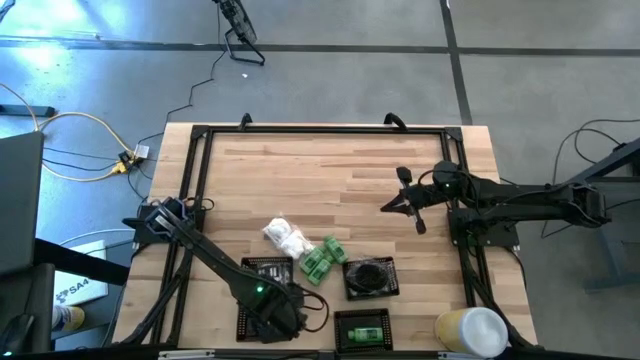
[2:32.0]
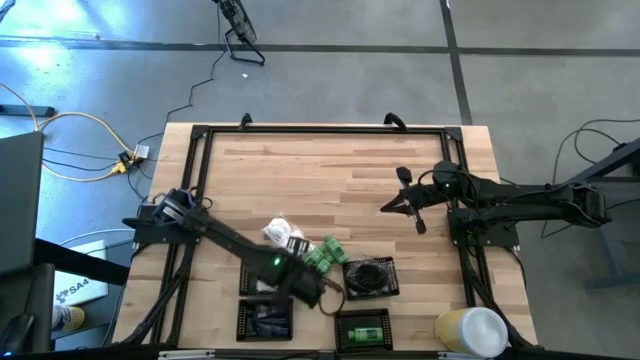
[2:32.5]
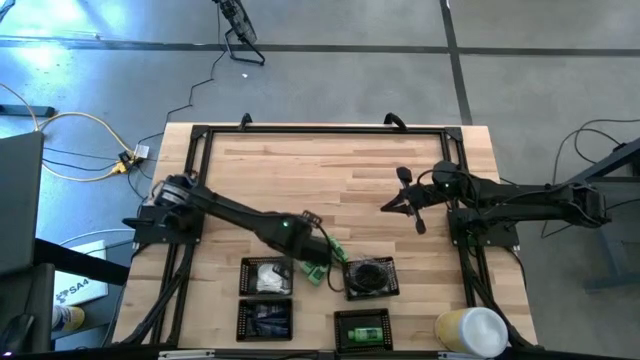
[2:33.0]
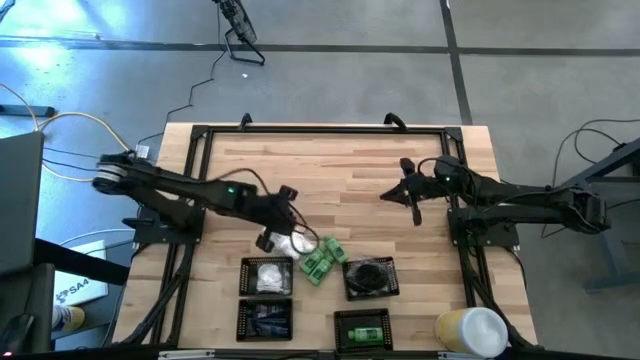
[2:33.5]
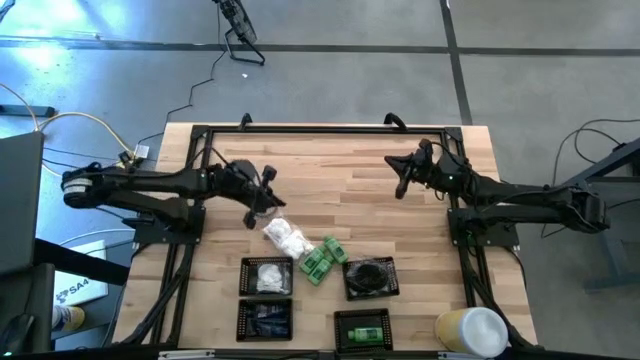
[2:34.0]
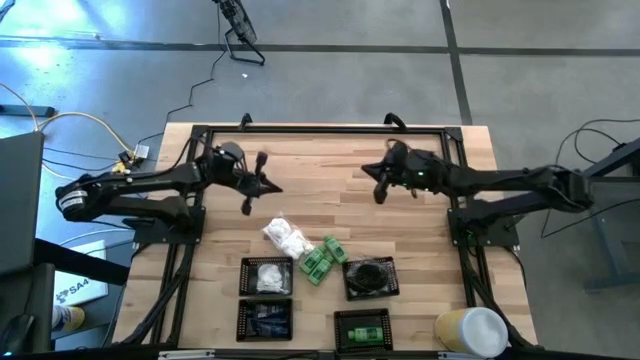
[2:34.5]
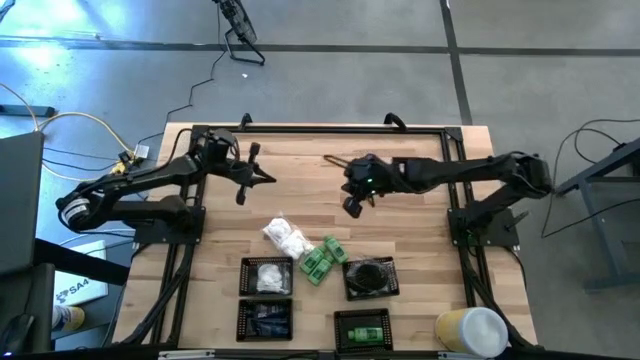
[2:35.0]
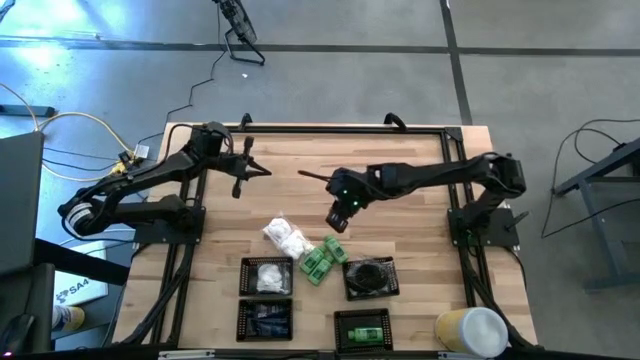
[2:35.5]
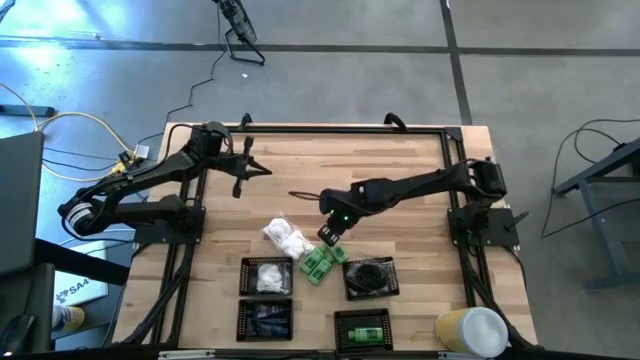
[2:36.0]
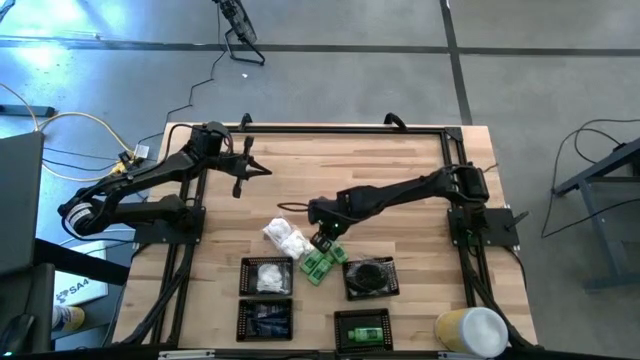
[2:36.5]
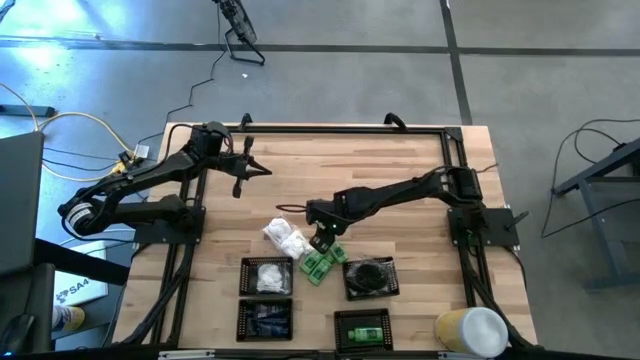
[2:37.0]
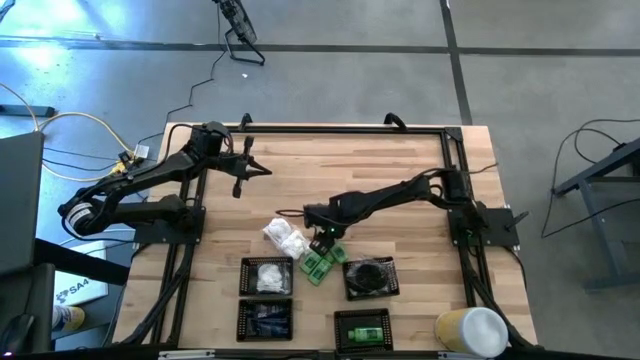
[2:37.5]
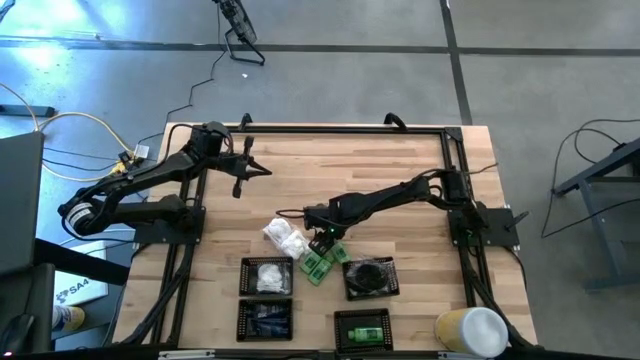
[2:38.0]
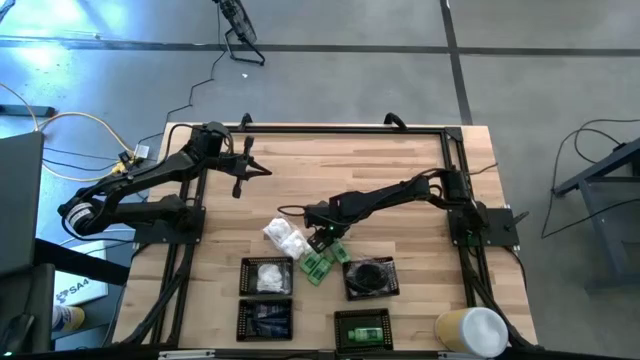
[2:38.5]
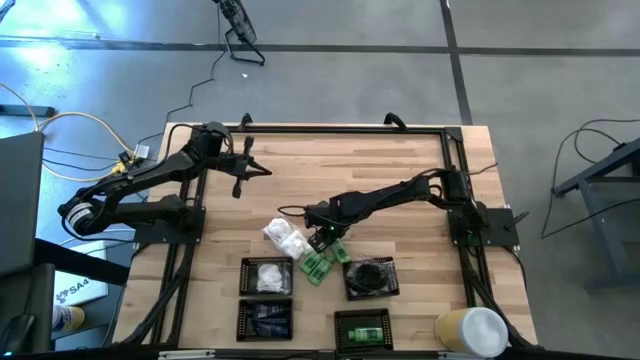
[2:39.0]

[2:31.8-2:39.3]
Task: Pick & Place Travel size toiletries
Put the green shampoo bottle into the bottom right black bin

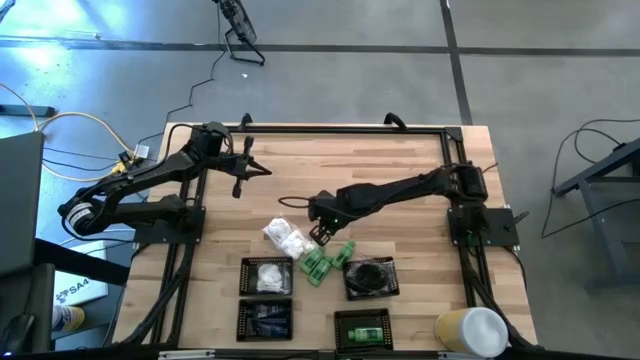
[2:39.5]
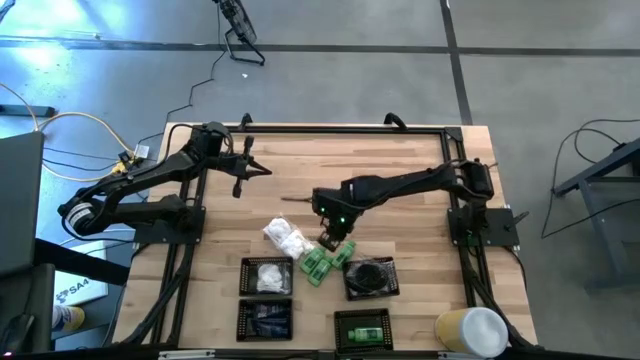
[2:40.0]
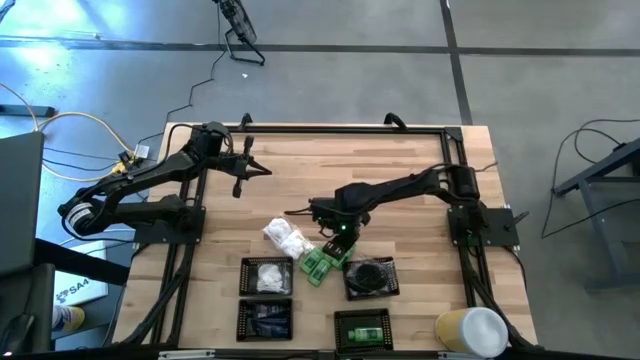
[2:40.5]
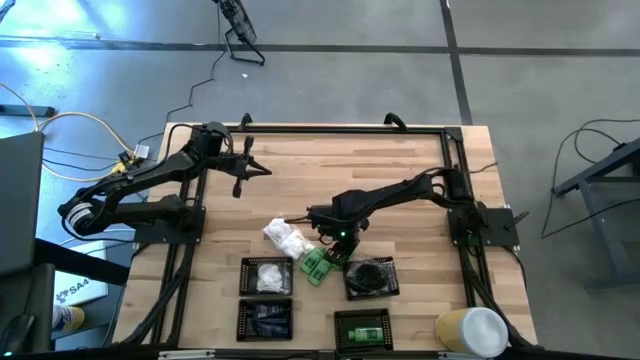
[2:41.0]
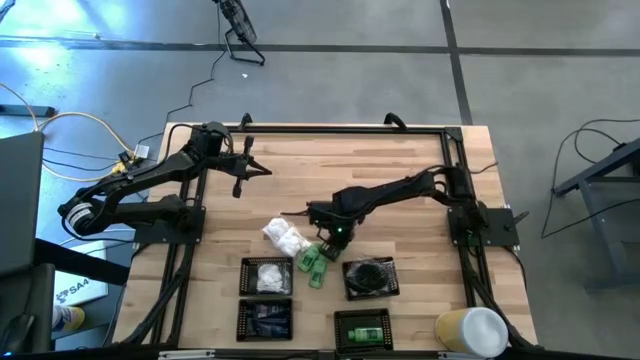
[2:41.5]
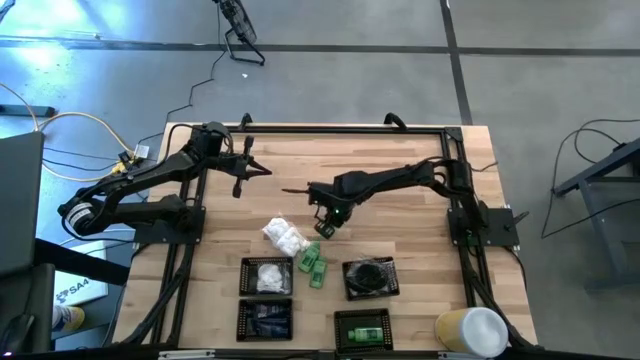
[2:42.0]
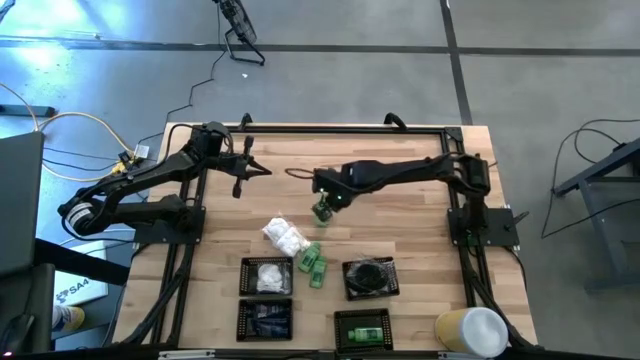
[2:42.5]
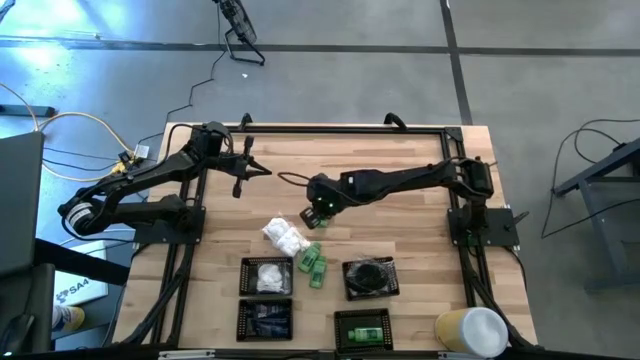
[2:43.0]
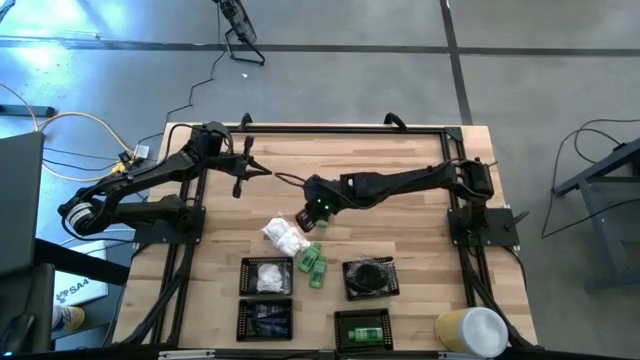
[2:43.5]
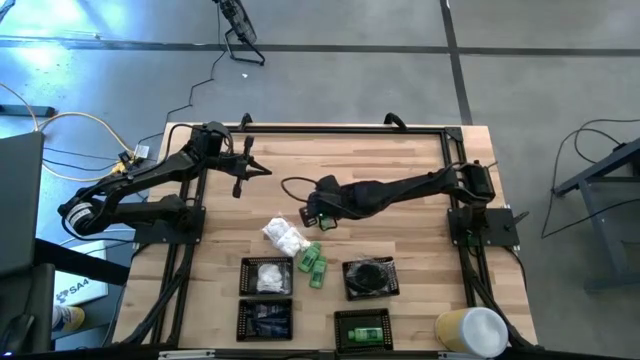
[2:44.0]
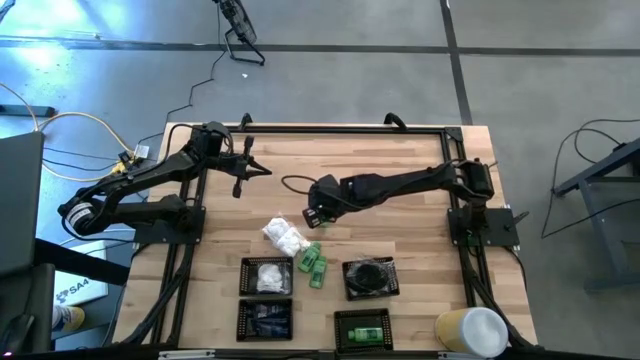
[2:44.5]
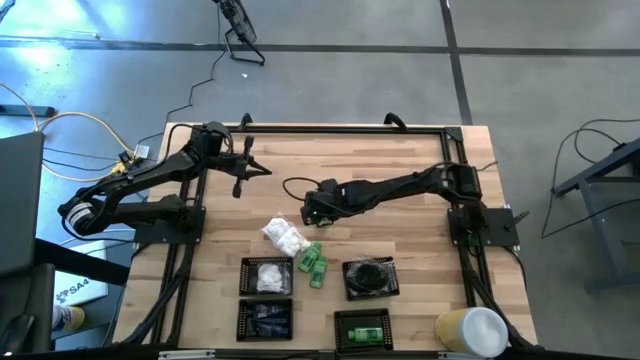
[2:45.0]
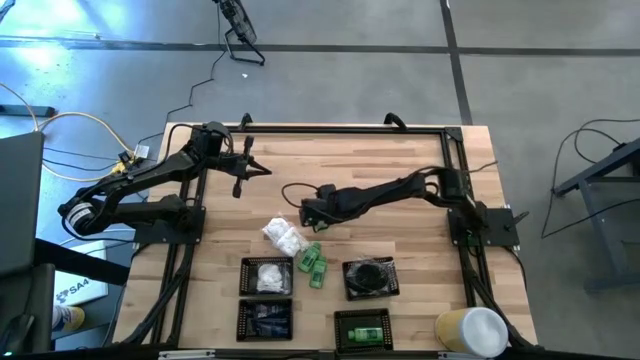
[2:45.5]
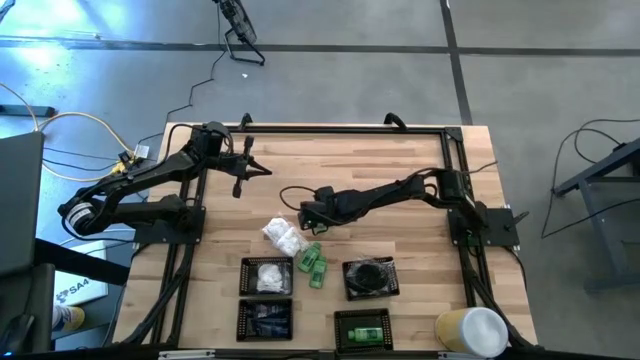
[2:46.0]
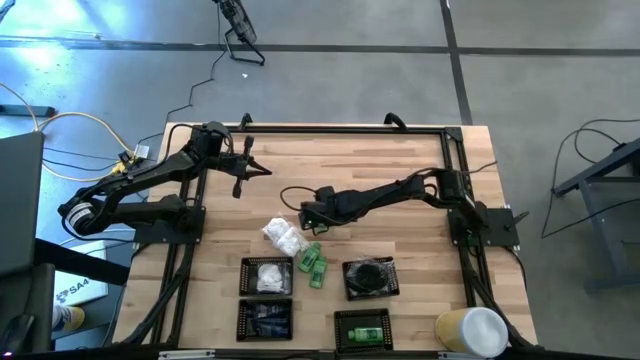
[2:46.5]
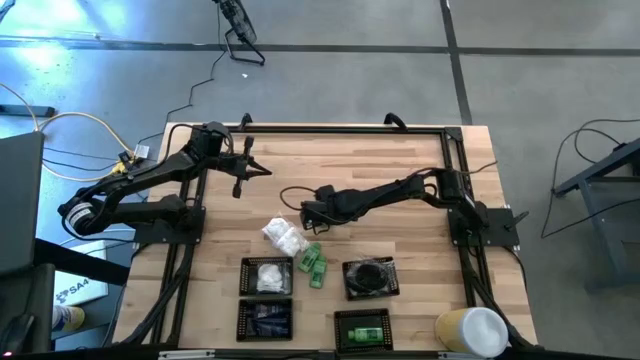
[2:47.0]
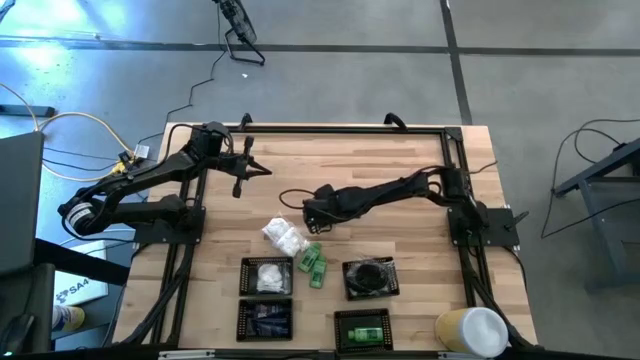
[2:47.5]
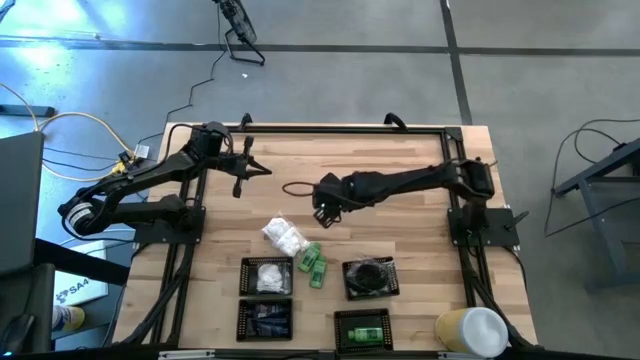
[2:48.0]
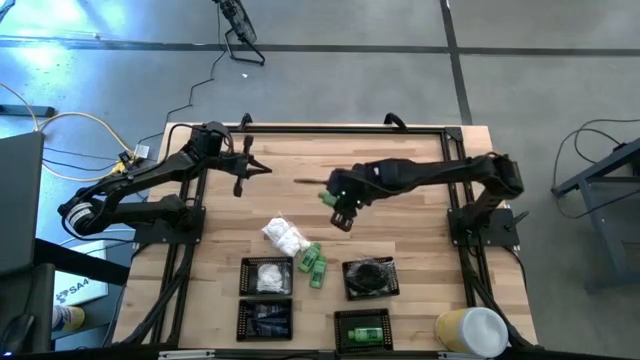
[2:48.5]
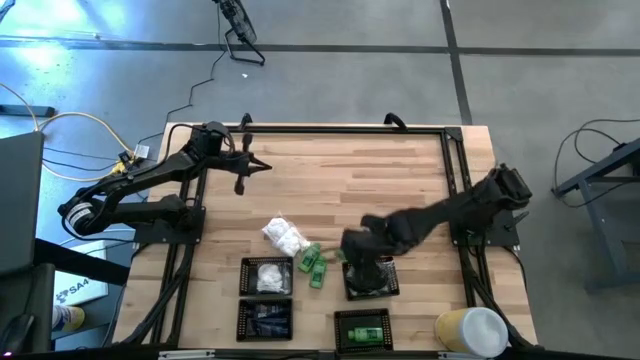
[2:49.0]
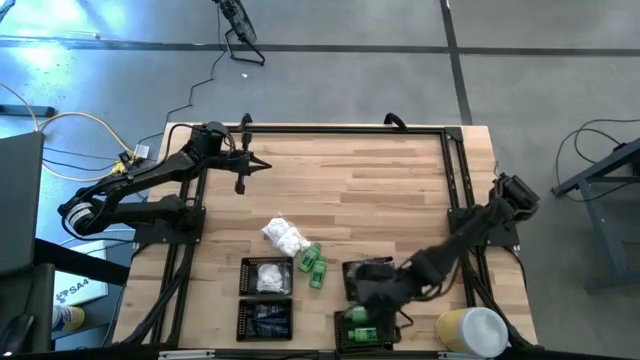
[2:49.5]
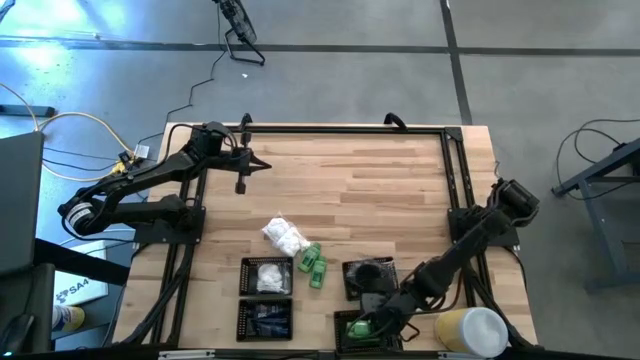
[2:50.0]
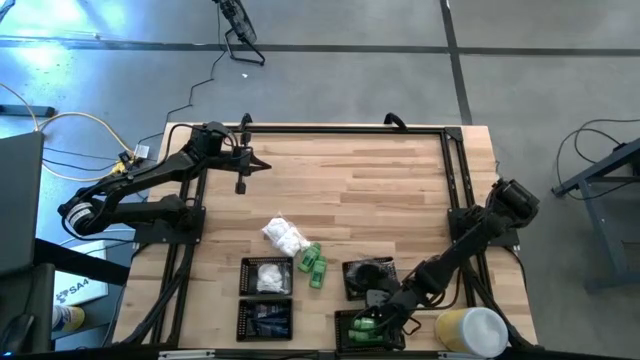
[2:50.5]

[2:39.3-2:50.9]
Put the green shampoo bottle into the bottom right black bin

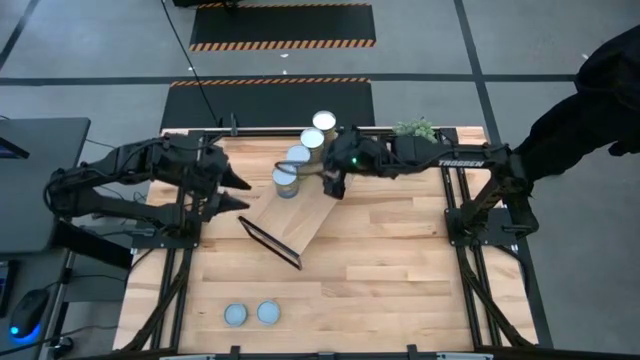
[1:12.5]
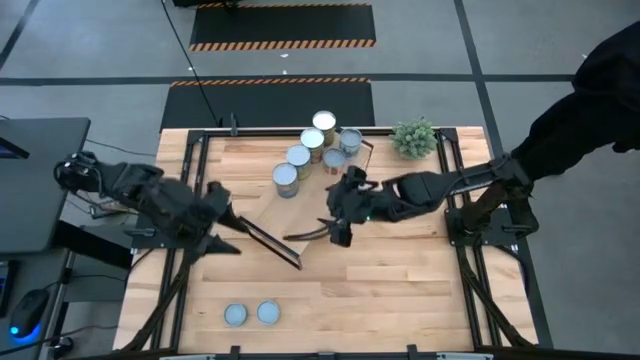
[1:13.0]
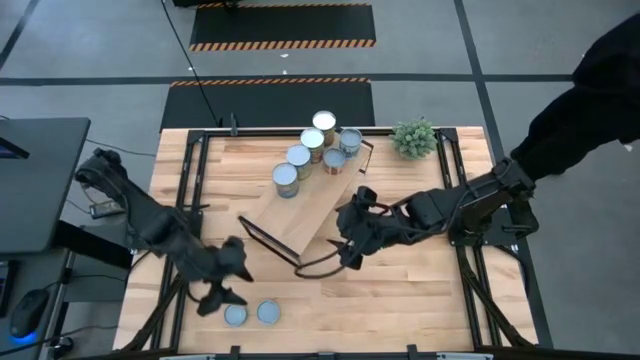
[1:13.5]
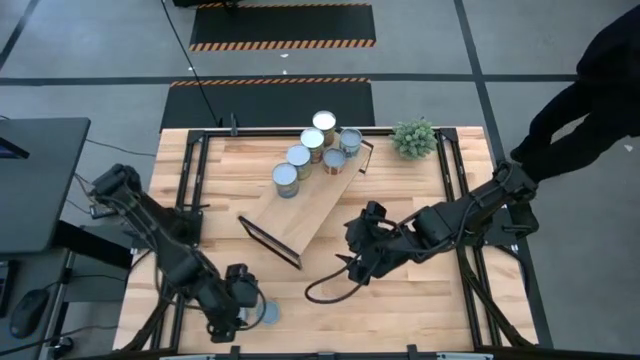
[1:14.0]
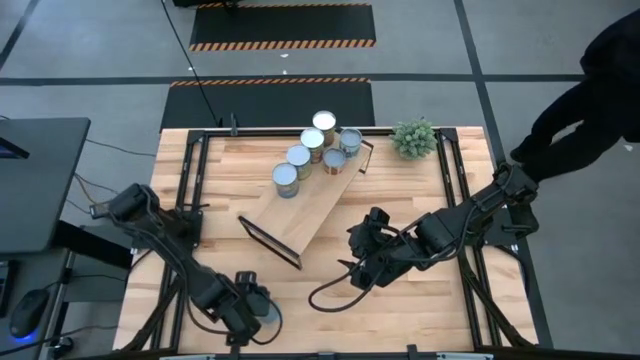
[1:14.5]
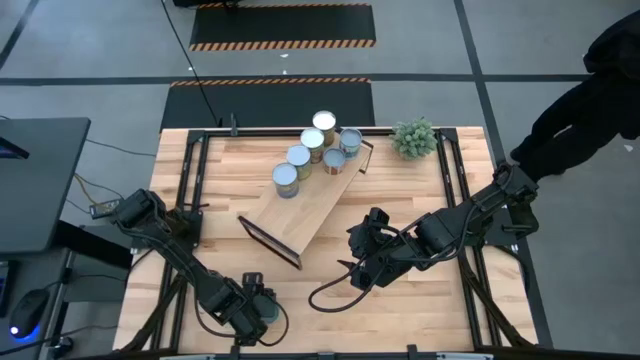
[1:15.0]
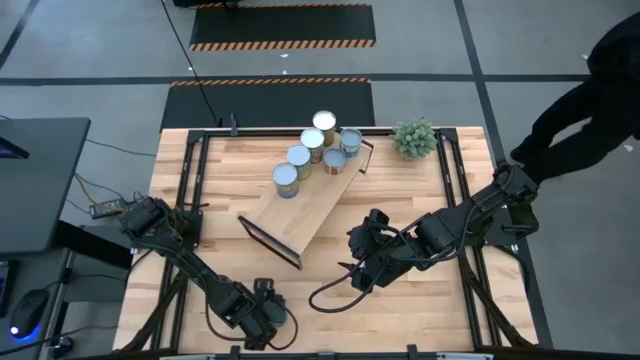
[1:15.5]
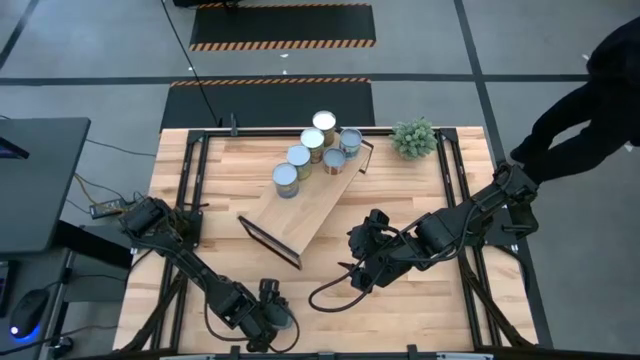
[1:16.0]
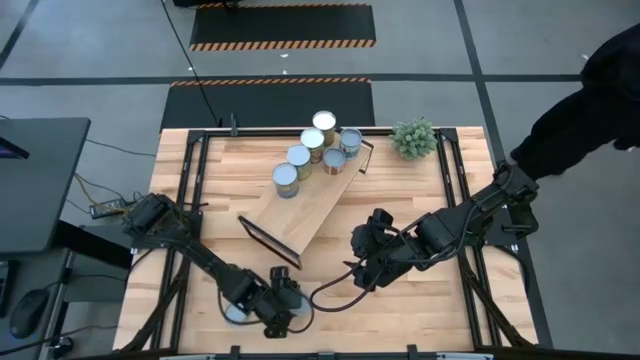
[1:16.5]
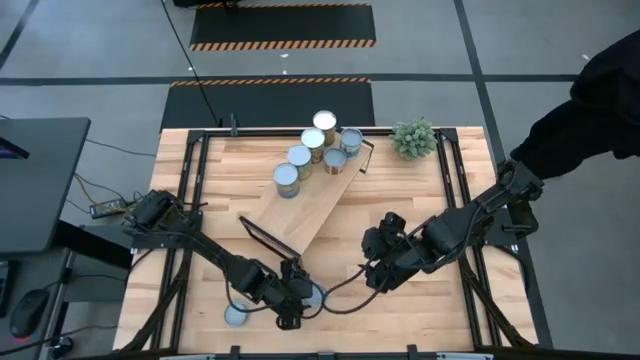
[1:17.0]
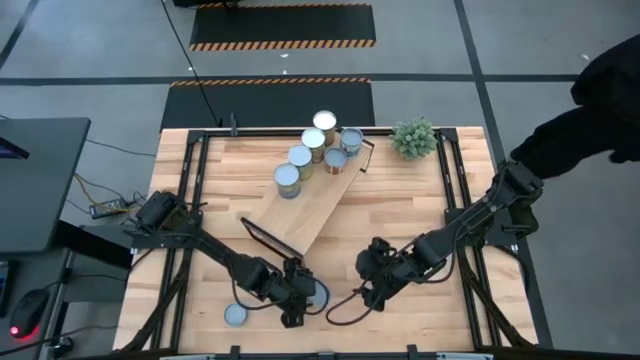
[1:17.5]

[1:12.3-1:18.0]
Task: Pick and place cans onto a shelf
Put the canned peas on the shelf
